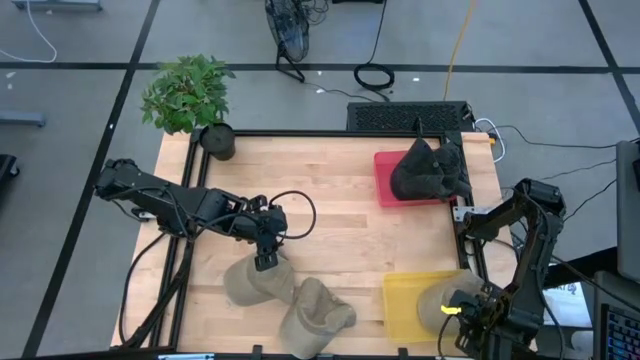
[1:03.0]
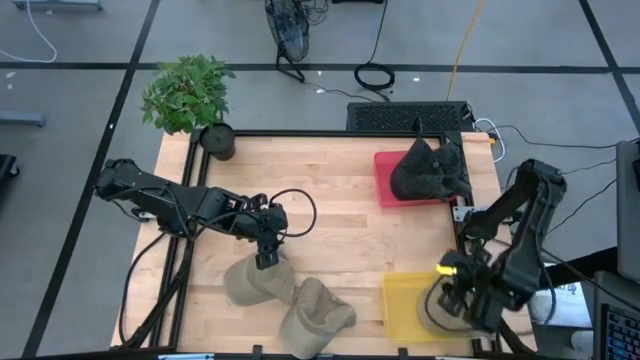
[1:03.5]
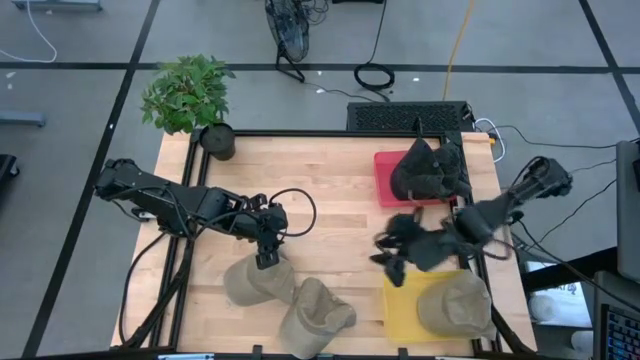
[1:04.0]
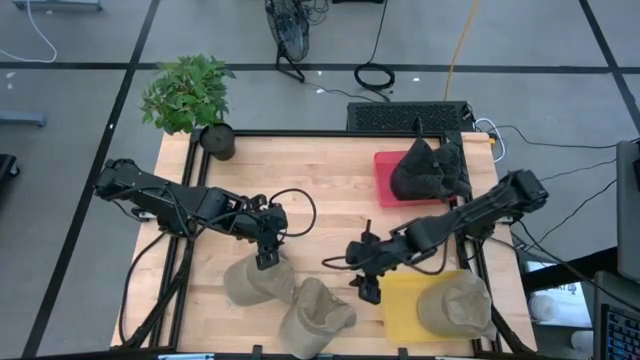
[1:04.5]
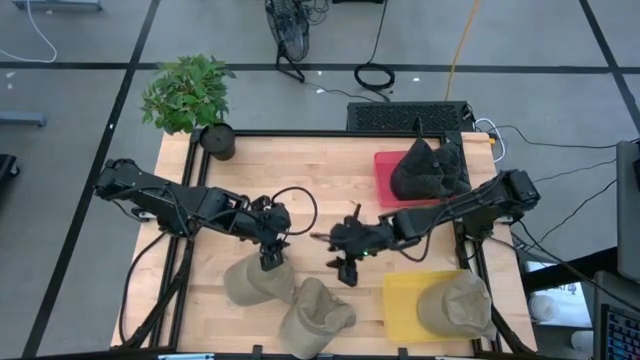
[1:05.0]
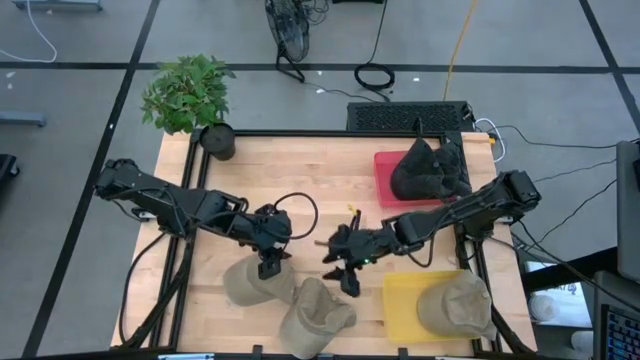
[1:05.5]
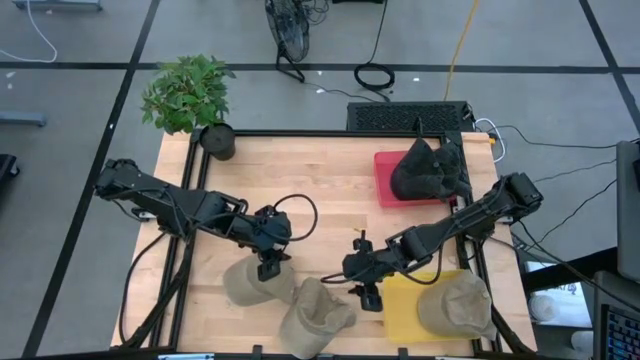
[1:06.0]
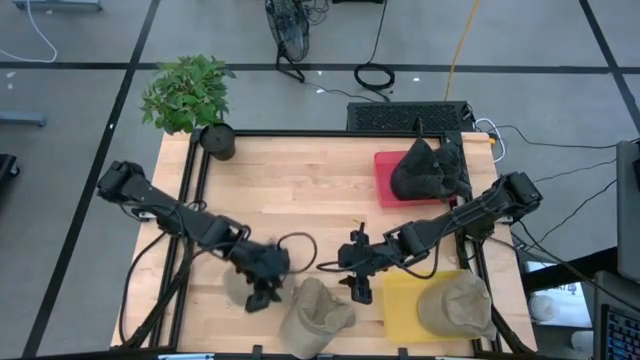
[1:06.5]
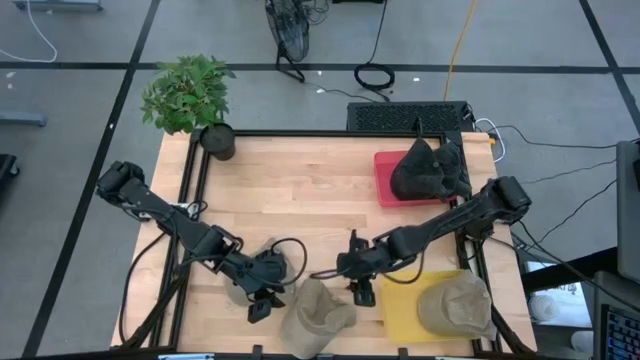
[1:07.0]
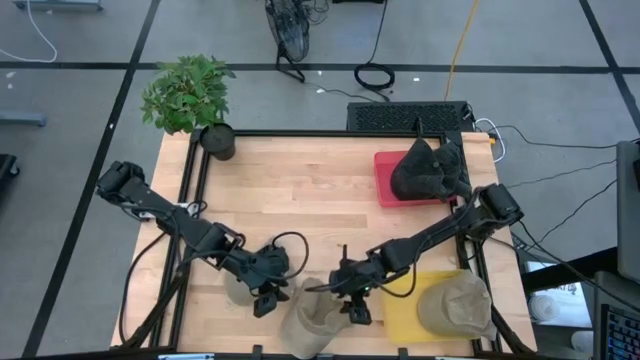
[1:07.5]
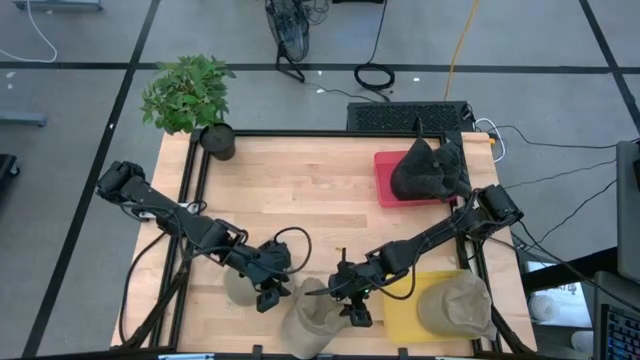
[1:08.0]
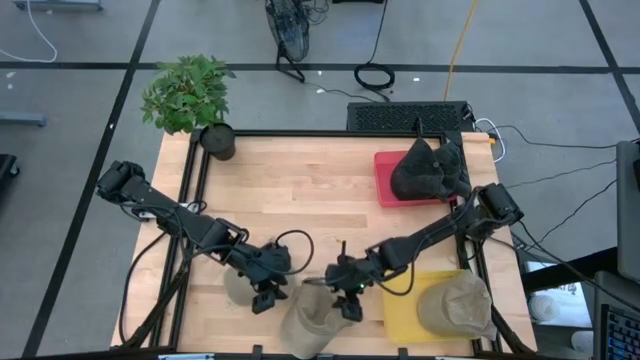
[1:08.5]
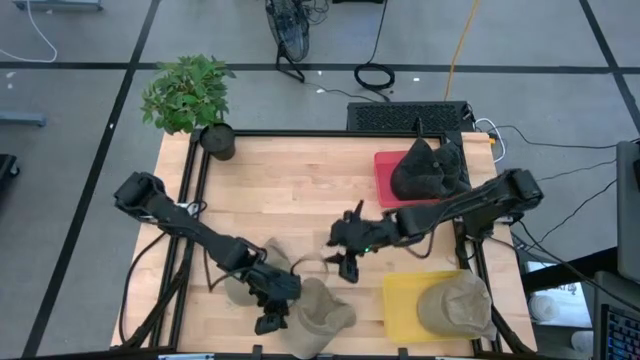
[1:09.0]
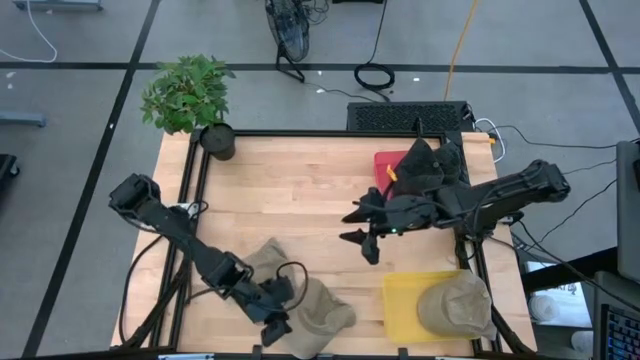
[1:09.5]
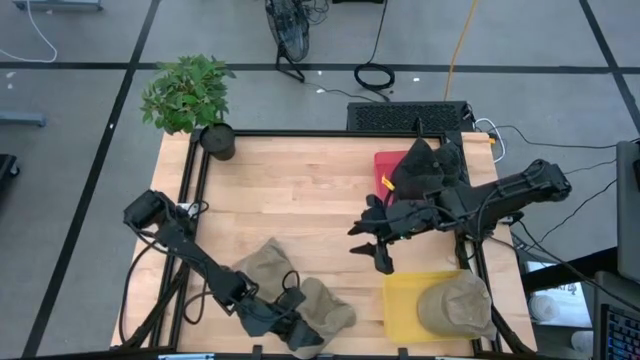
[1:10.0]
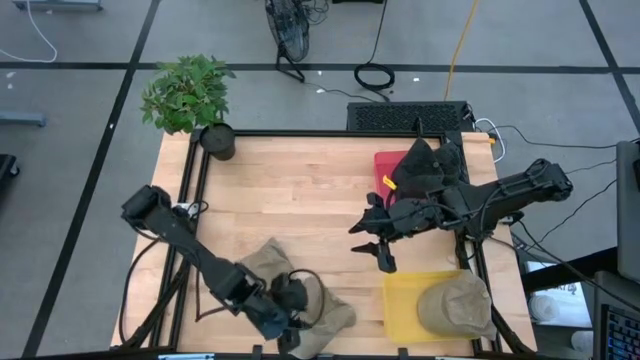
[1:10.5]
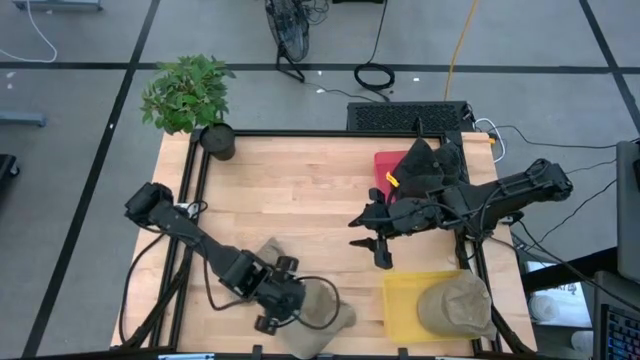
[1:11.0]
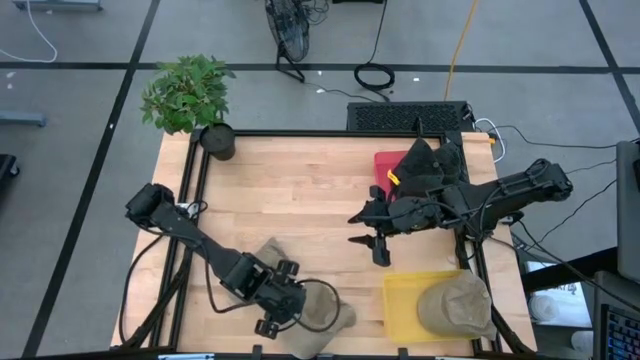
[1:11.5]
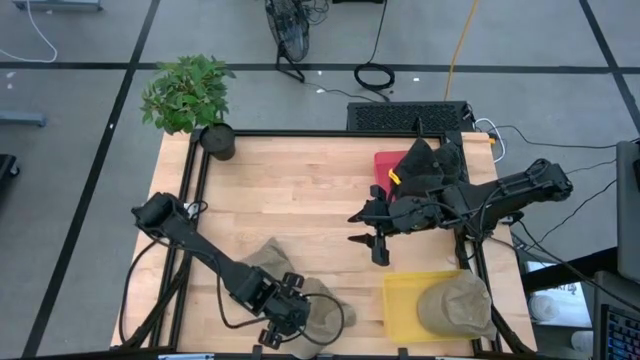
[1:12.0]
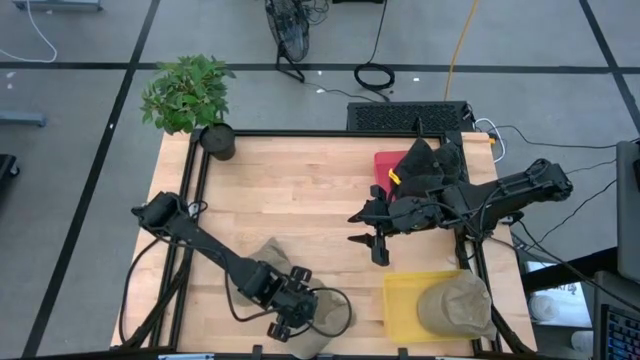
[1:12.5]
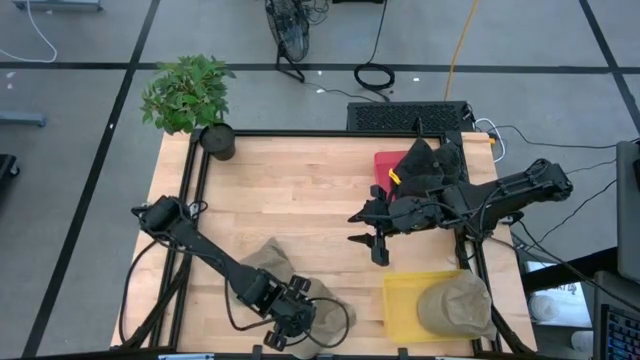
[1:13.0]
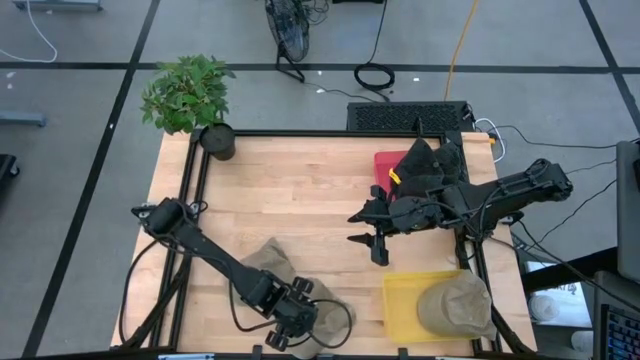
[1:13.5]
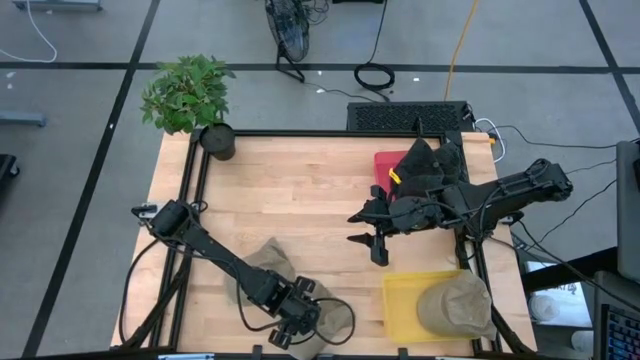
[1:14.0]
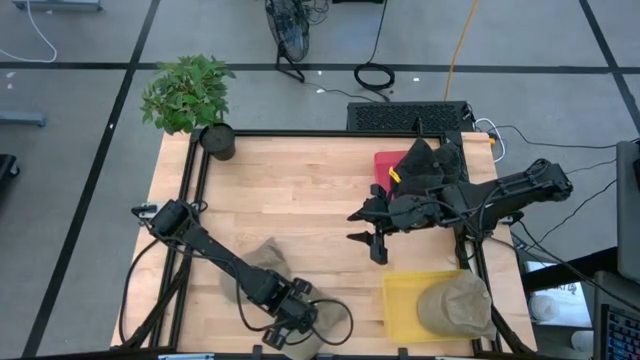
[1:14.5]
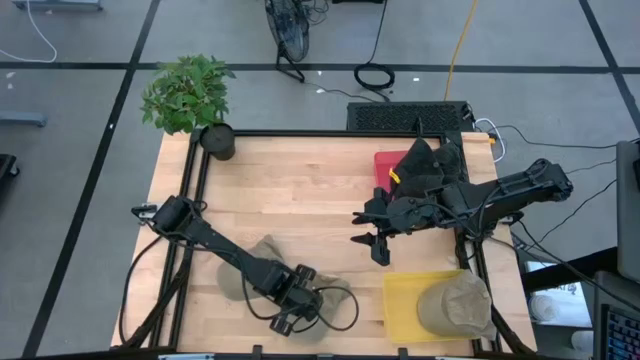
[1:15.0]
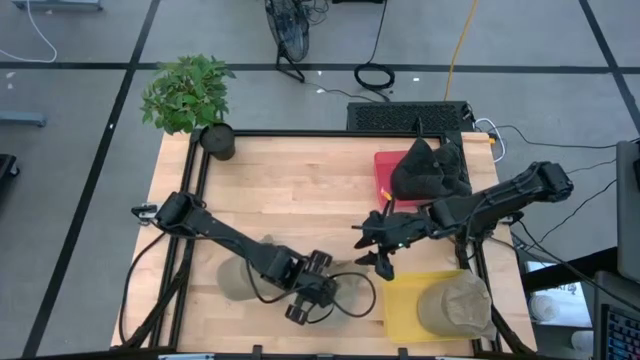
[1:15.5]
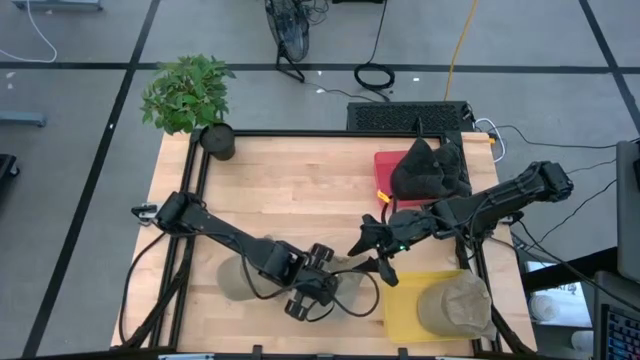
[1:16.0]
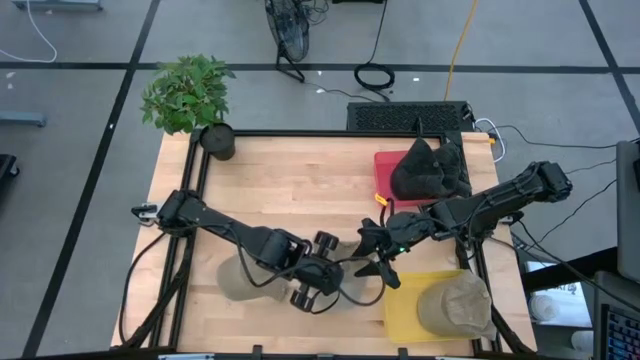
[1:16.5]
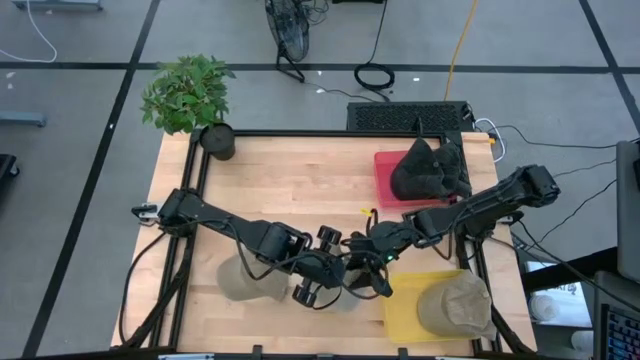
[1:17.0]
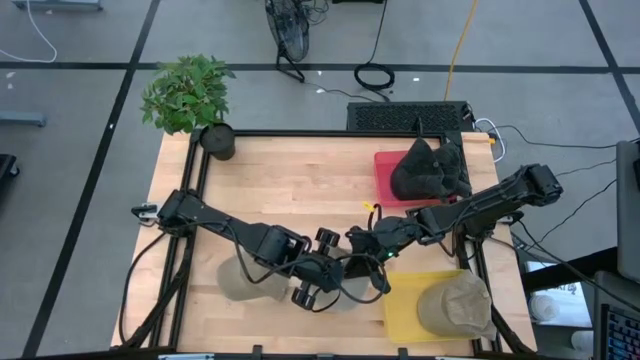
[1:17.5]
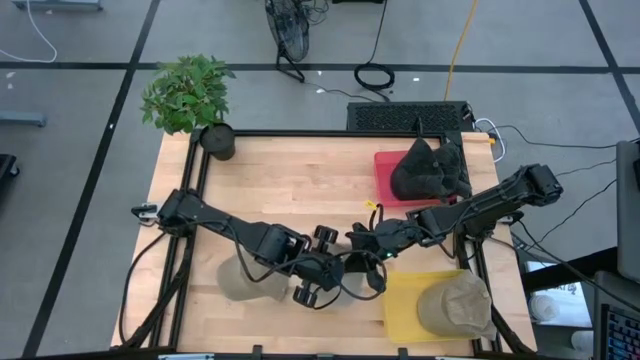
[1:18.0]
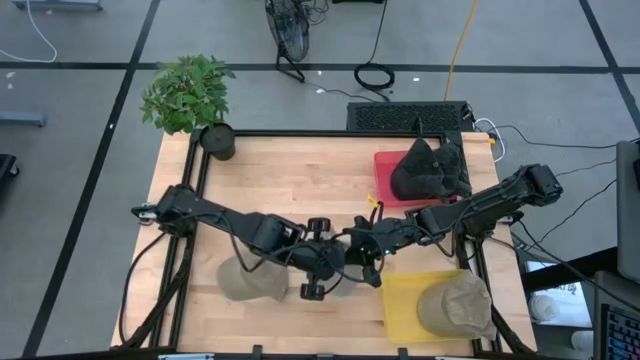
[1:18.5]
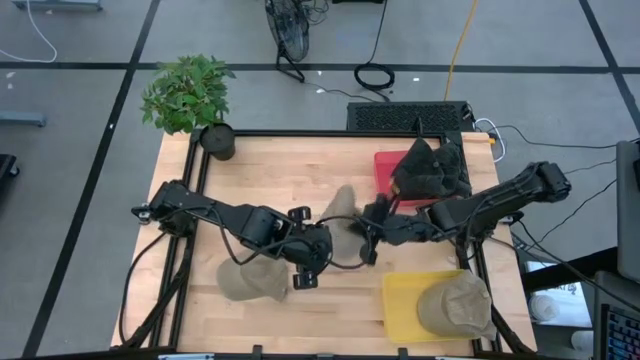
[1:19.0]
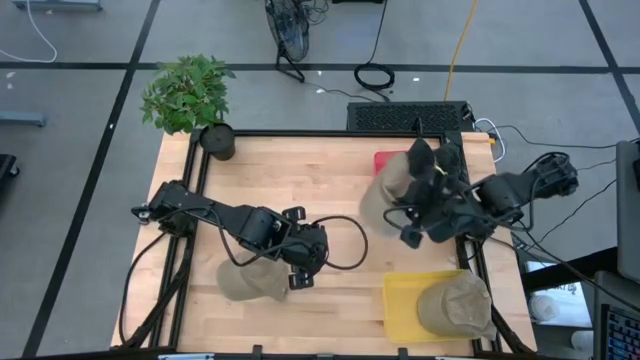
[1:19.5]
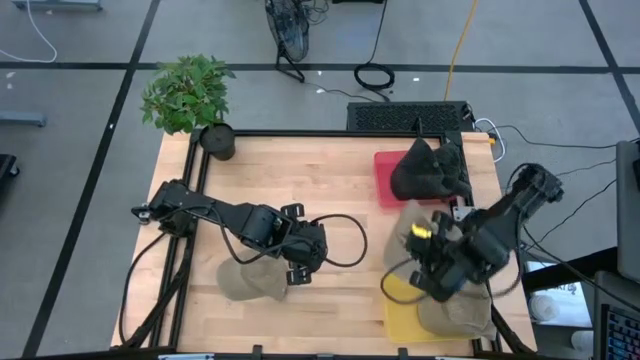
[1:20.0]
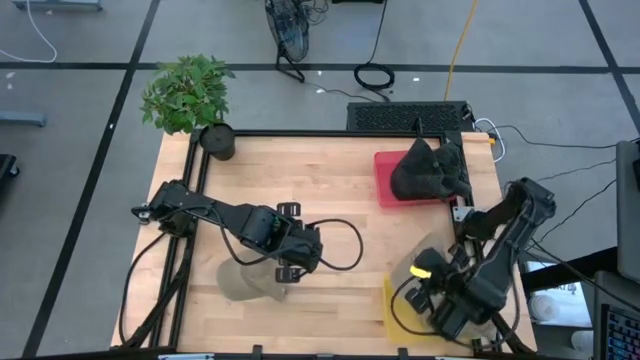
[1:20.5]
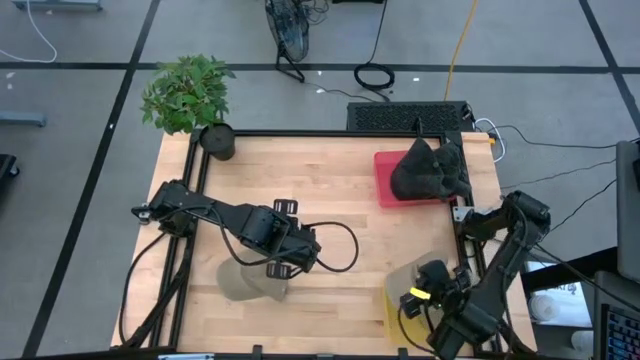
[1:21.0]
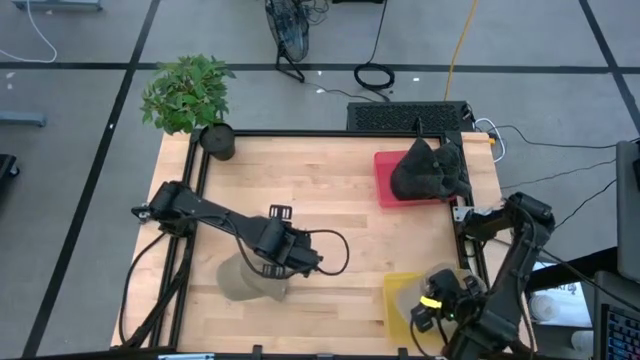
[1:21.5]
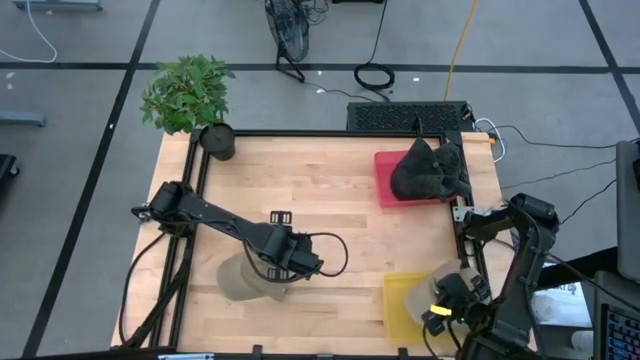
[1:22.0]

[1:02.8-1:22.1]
Task: Pick & Place hat
Put the bottom brown cap into the yellow bin

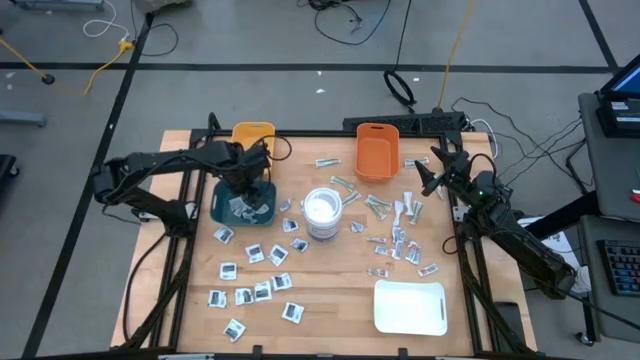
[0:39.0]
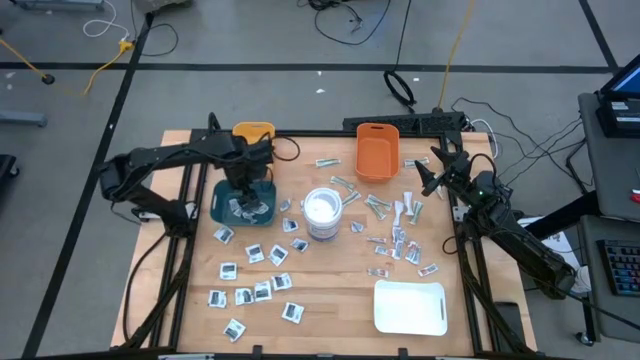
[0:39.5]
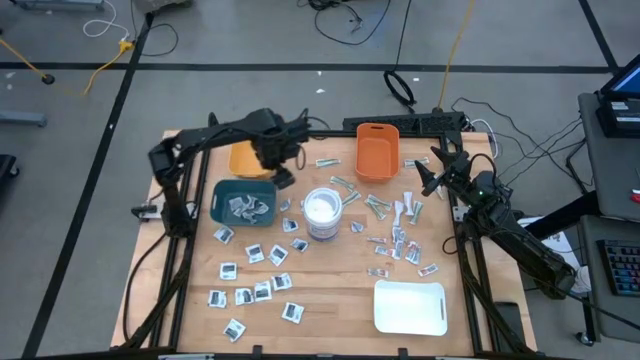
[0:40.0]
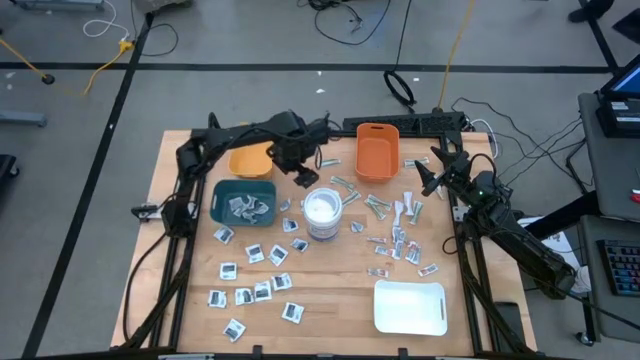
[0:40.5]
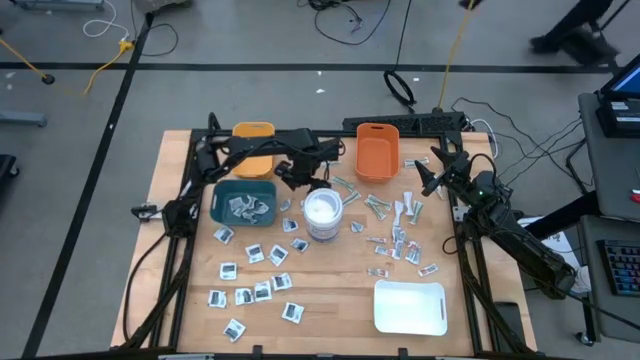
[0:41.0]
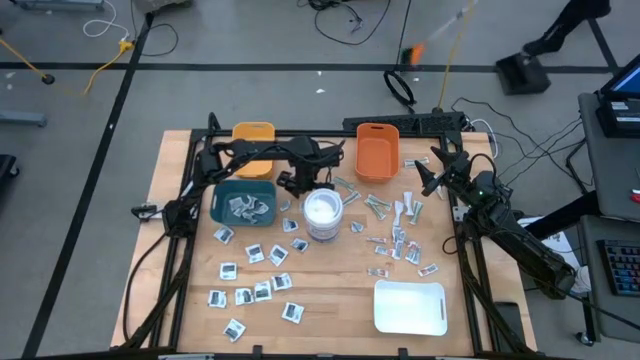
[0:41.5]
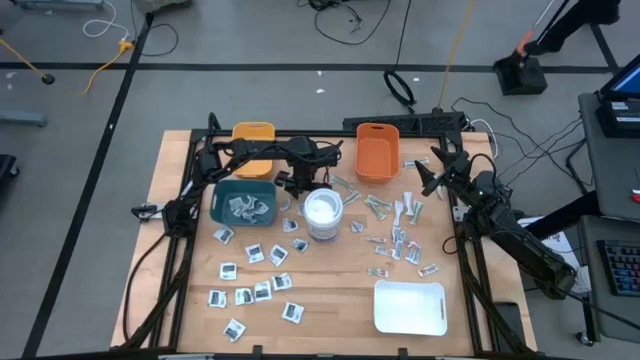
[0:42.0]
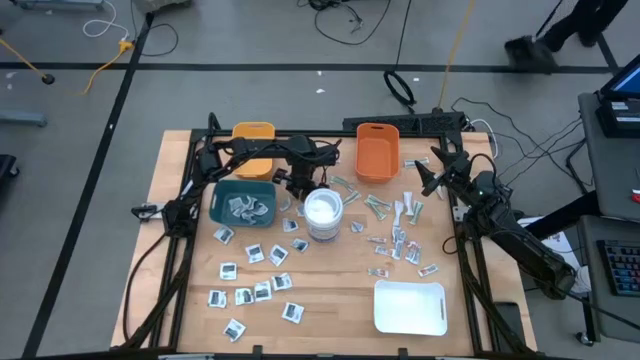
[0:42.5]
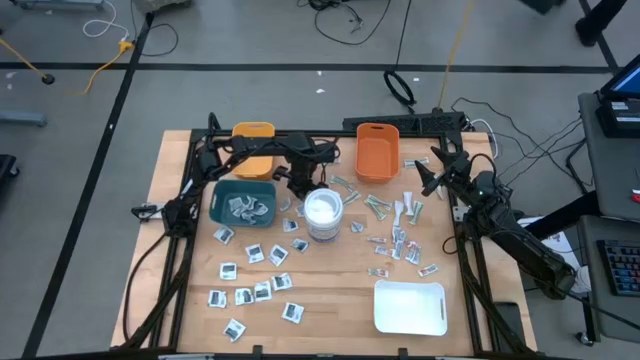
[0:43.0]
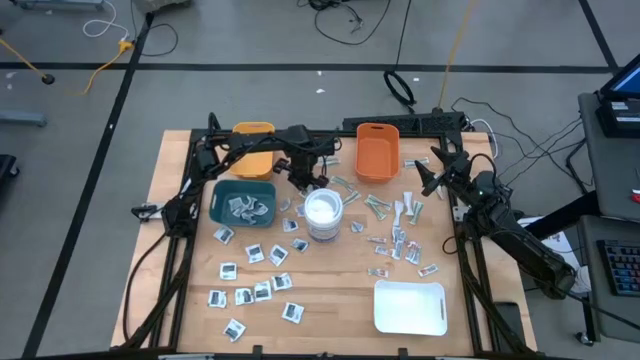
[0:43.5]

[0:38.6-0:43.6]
Task: Pick & Place First Aid Supplies
Put the blue pad into the blue bin
